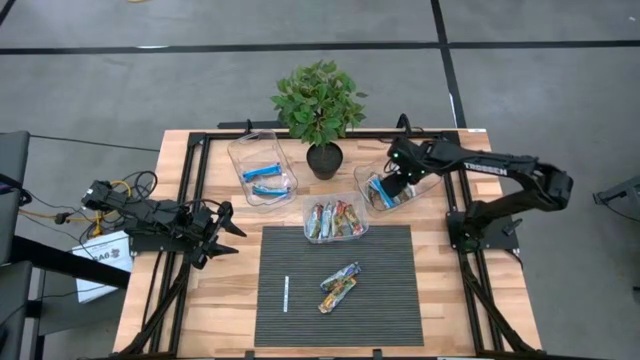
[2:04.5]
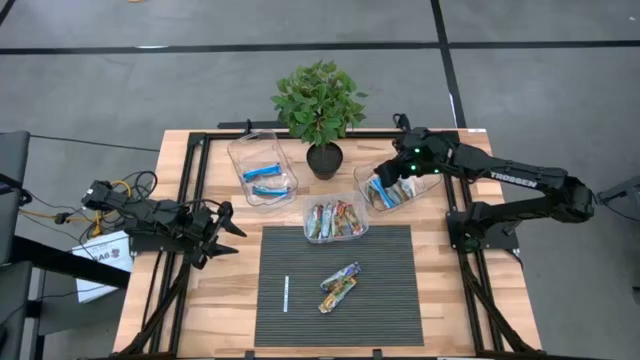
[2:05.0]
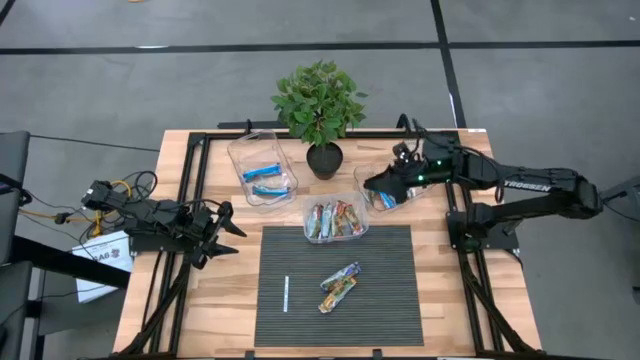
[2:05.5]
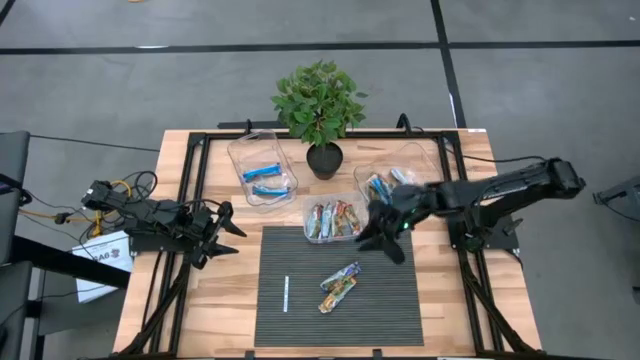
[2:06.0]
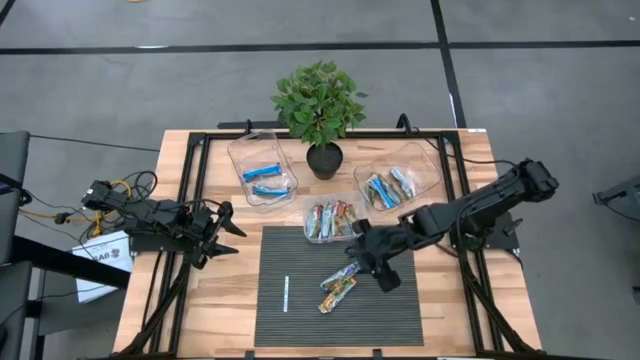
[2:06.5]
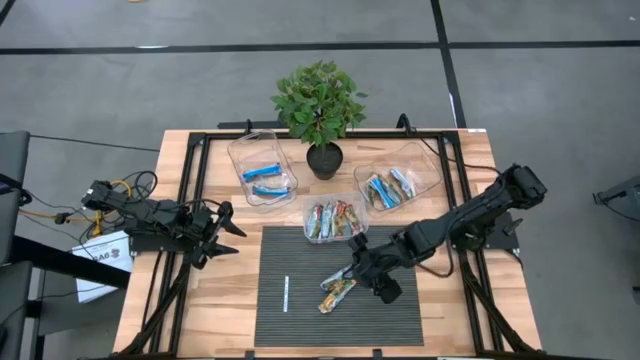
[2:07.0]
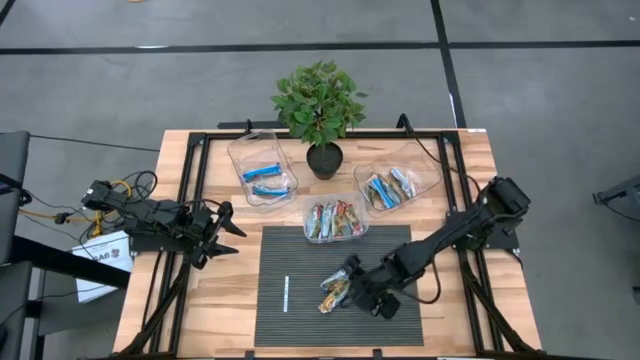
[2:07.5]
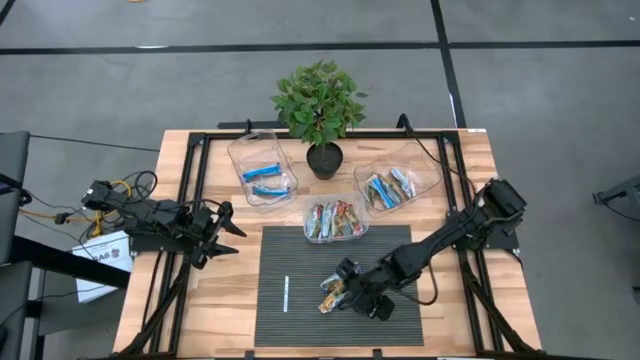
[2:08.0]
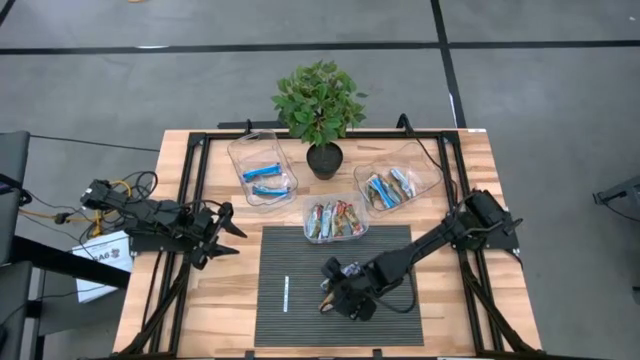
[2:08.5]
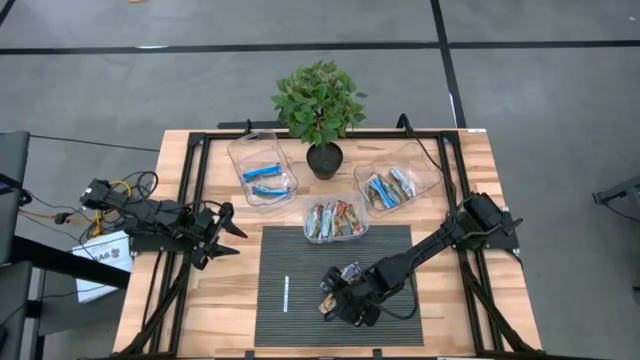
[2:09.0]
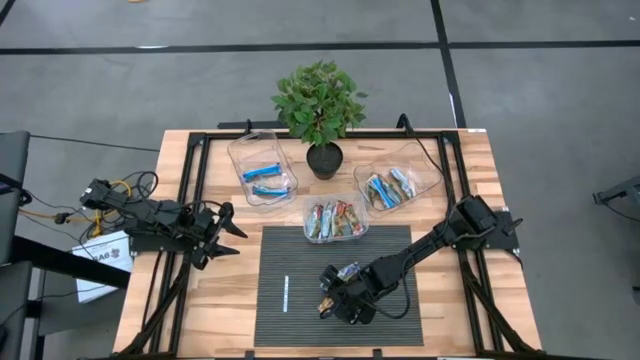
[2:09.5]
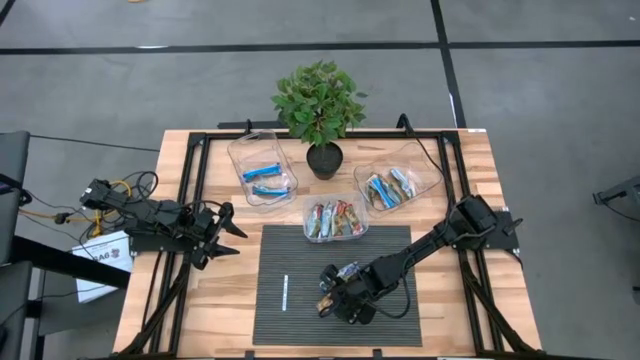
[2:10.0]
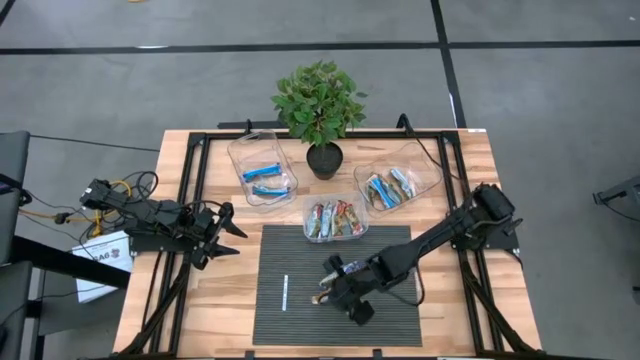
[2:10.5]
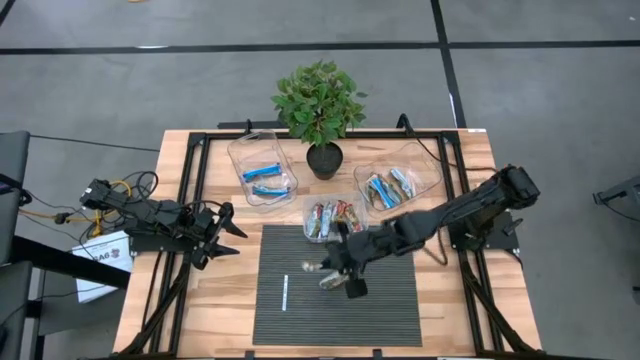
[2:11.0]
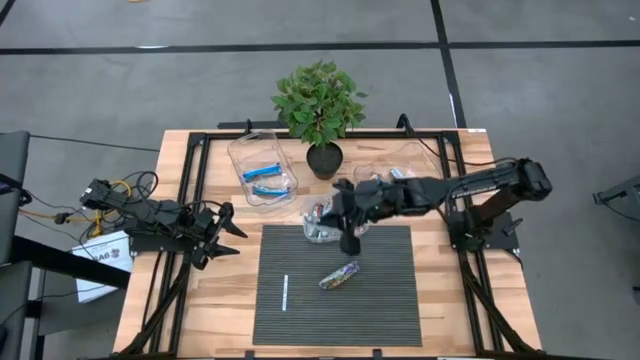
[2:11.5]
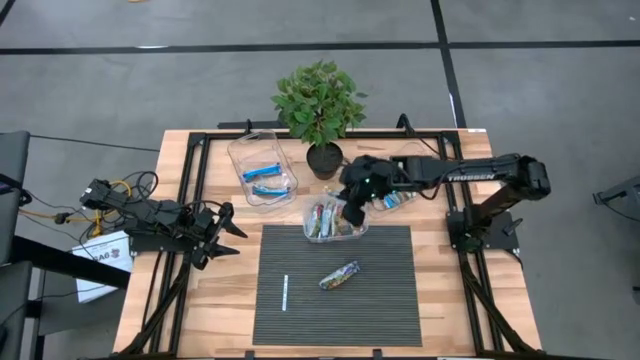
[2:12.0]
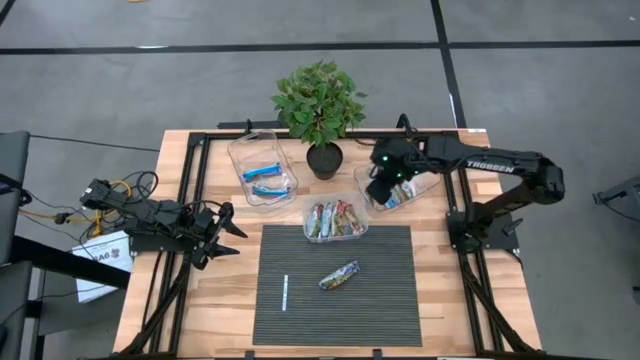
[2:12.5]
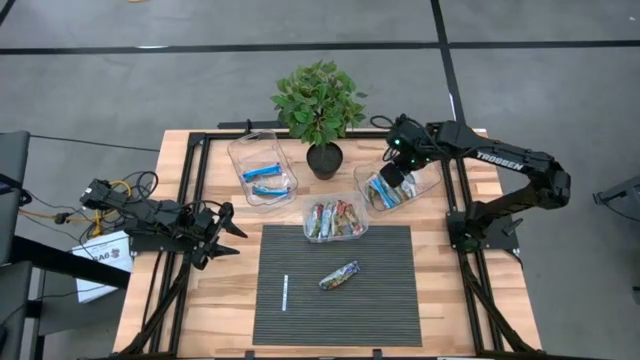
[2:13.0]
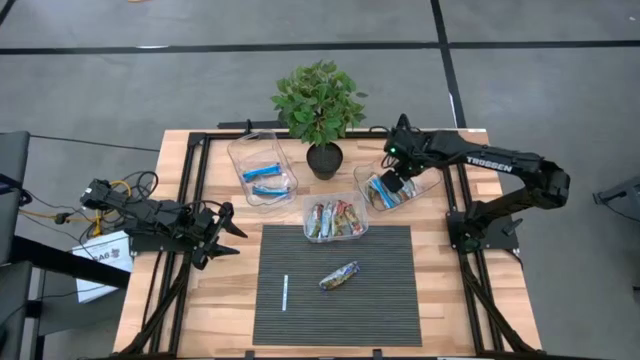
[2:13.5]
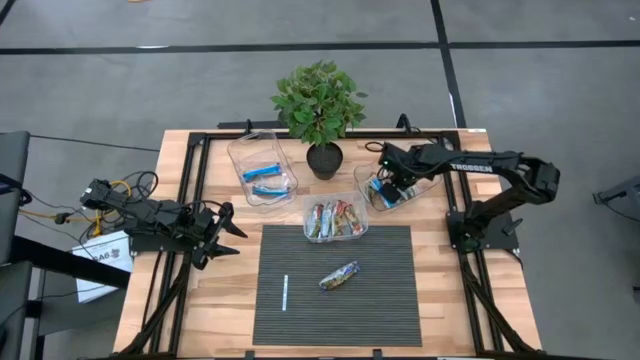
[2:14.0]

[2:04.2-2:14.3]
Task: Pick and place Granola Bars by type
Put the yellow granola bar into the right transparent bin

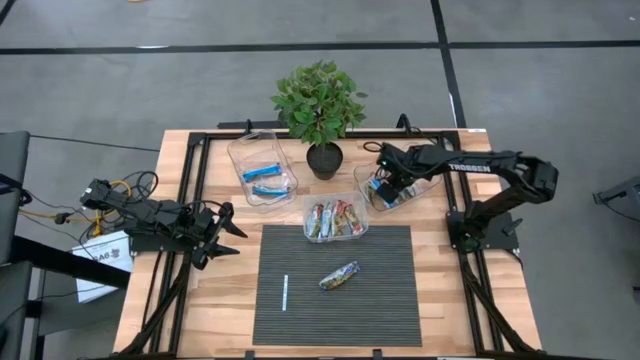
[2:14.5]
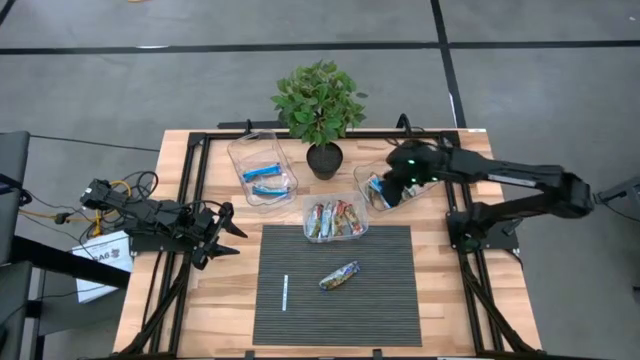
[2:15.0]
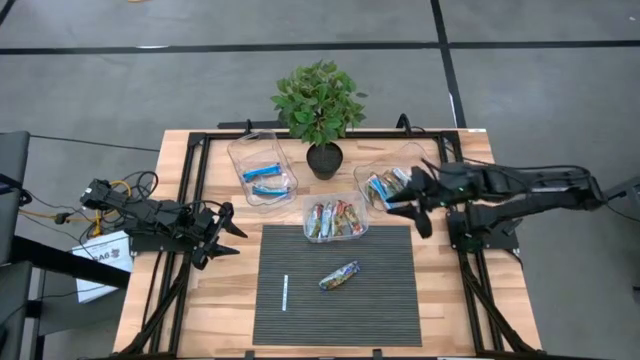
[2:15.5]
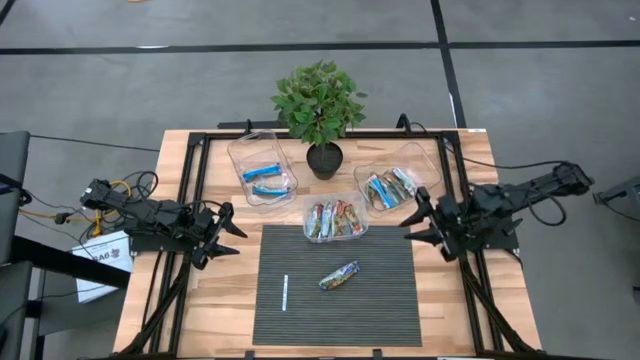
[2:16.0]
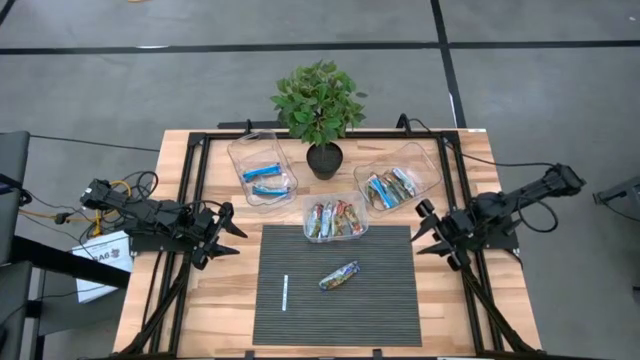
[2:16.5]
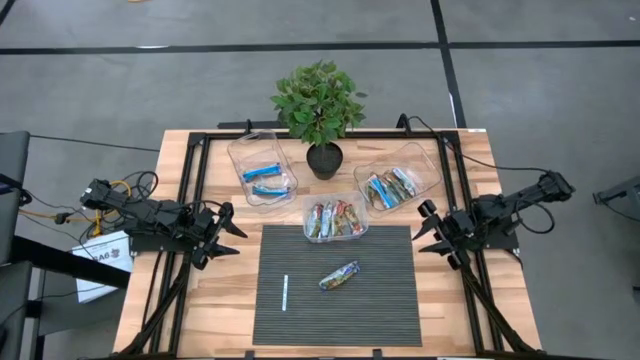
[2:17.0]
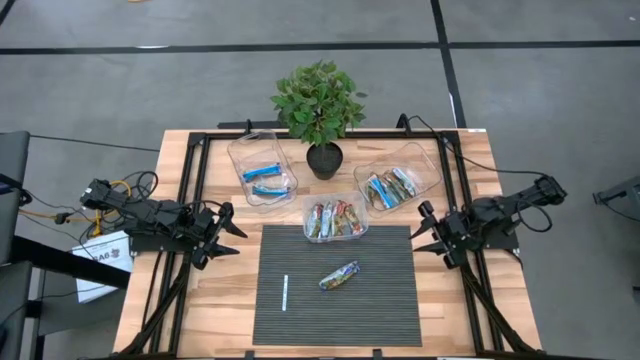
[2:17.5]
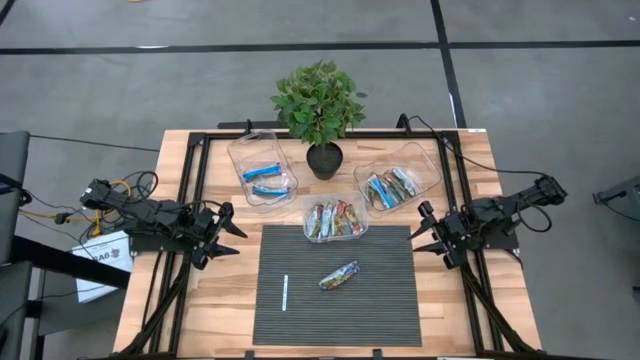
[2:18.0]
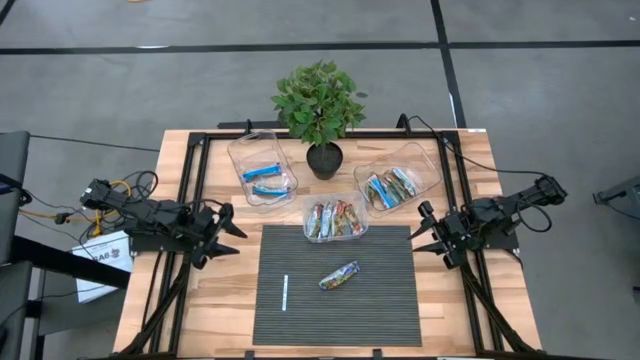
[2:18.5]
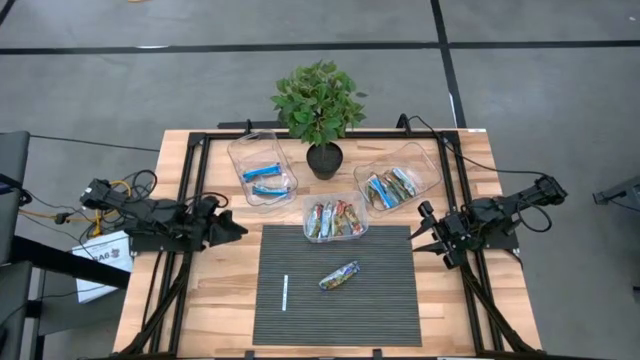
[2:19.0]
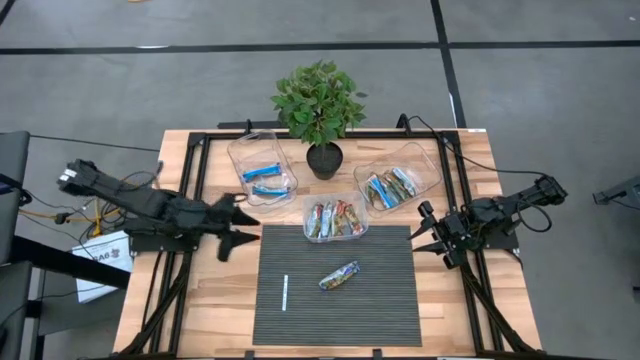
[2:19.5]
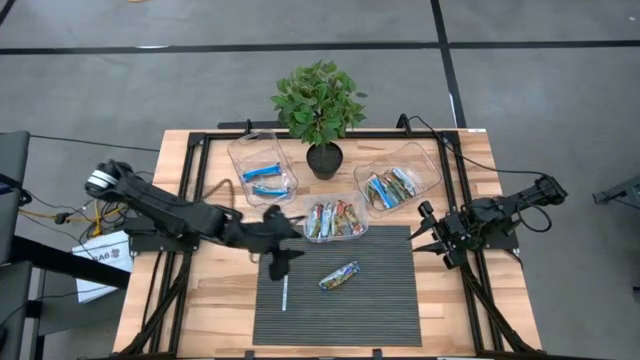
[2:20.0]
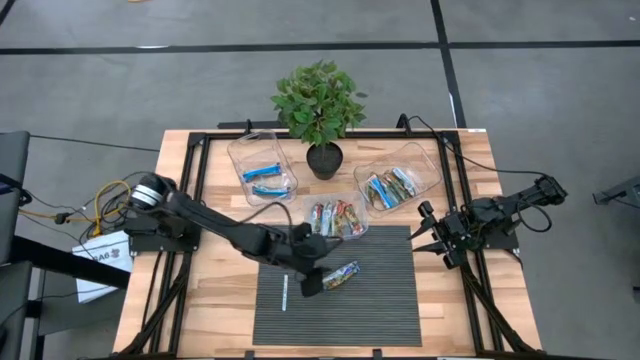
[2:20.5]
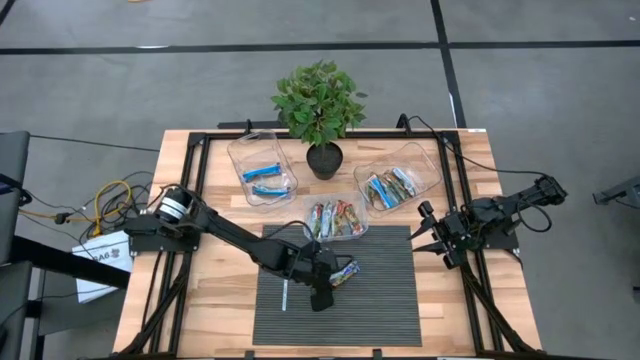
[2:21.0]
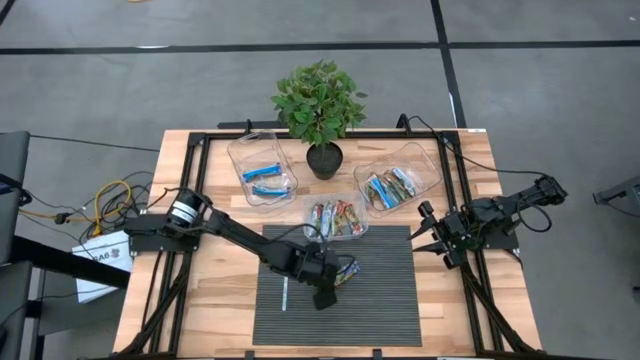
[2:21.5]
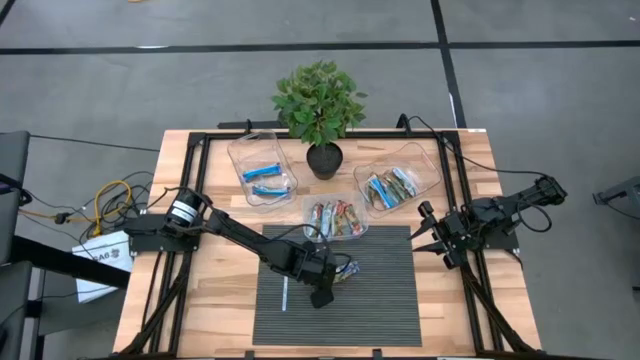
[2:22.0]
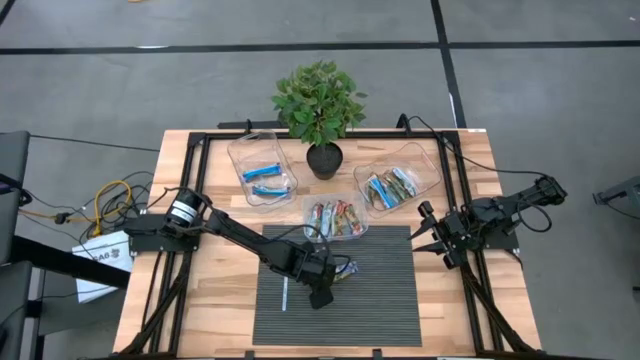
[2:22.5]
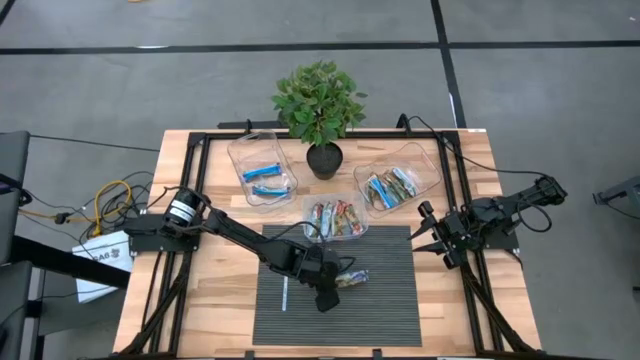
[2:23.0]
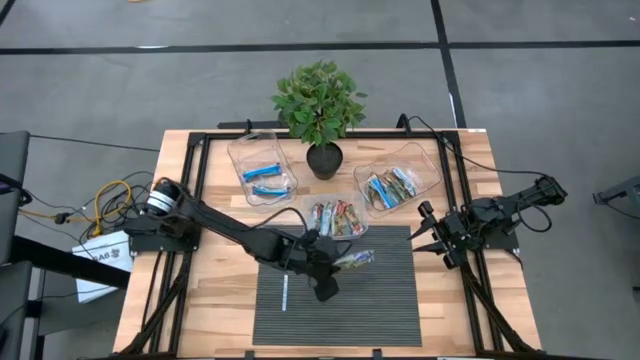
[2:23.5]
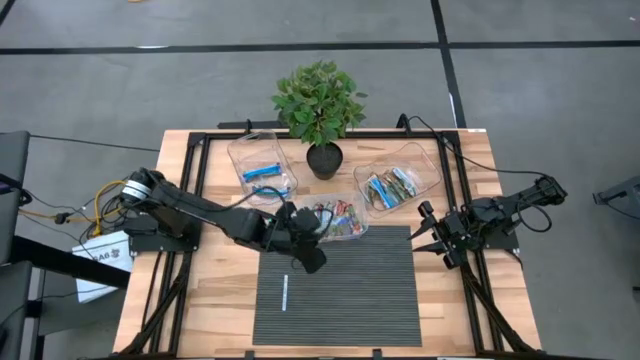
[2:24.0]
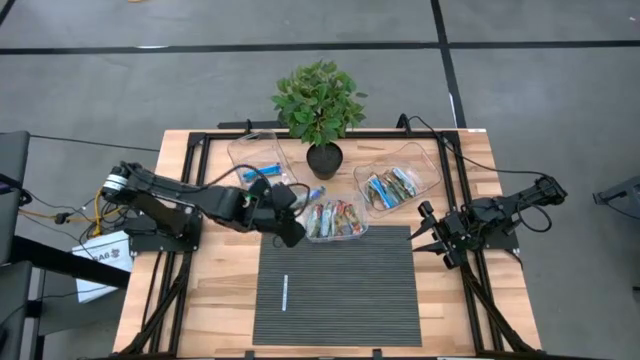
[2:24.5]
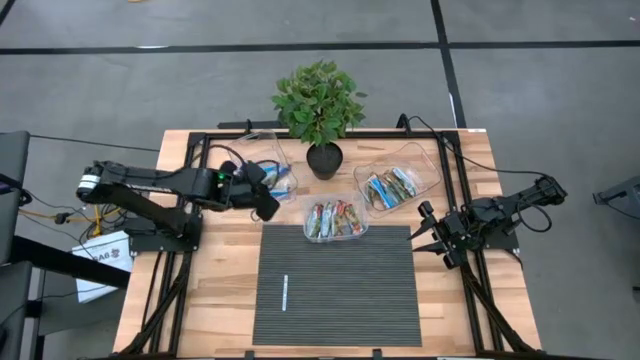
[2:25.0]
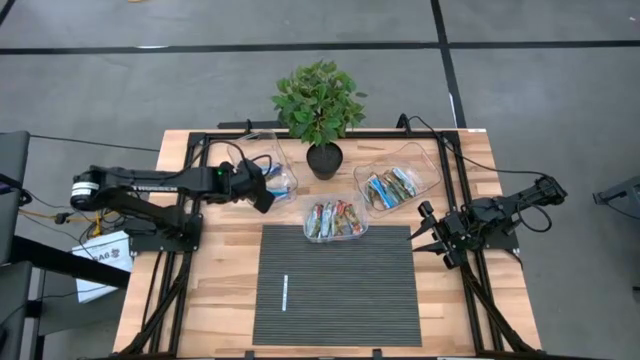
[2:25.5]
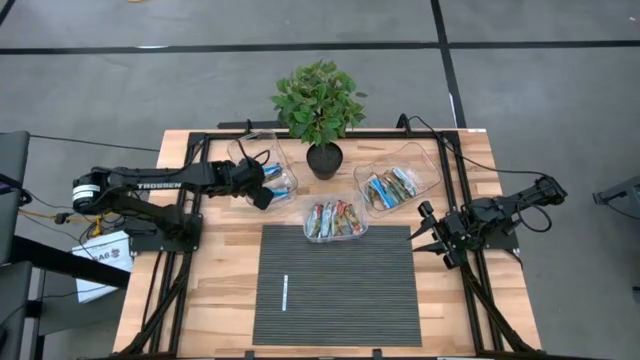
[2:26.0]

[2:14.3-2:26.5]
Put the blue granola bar into the left transparent bin
